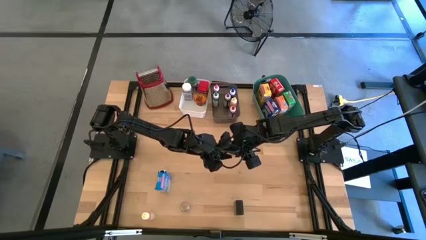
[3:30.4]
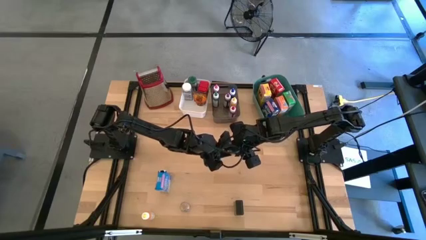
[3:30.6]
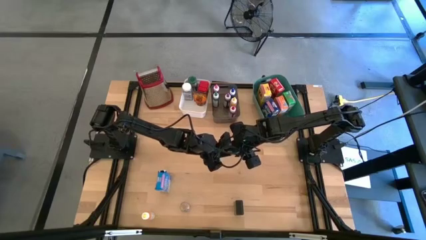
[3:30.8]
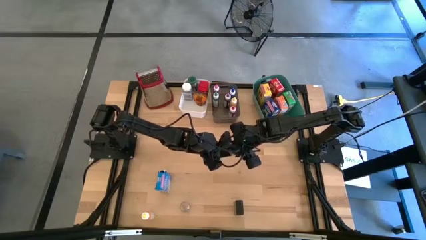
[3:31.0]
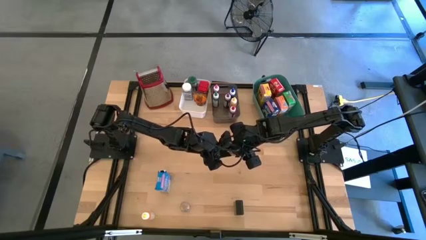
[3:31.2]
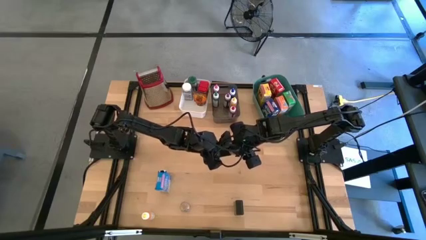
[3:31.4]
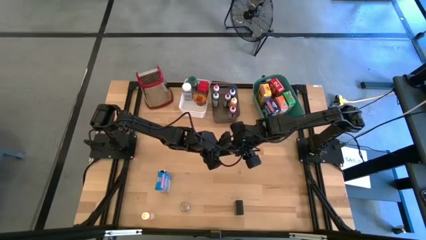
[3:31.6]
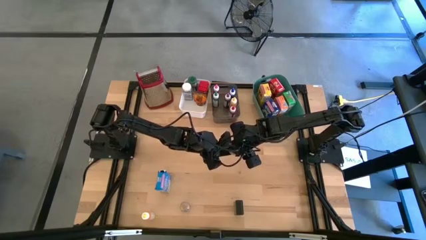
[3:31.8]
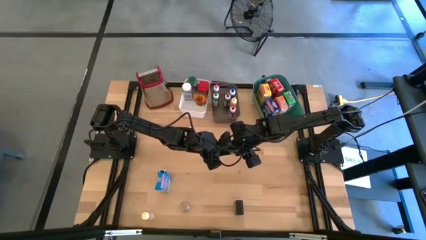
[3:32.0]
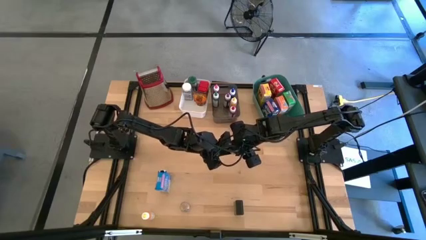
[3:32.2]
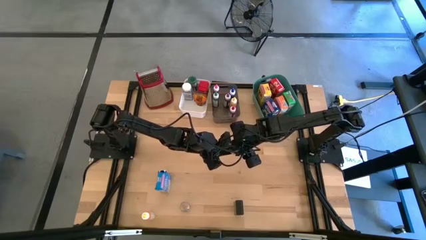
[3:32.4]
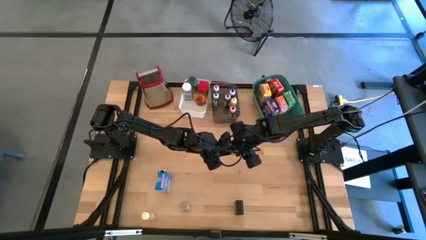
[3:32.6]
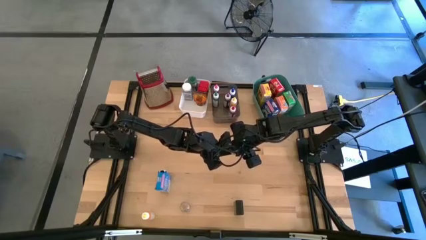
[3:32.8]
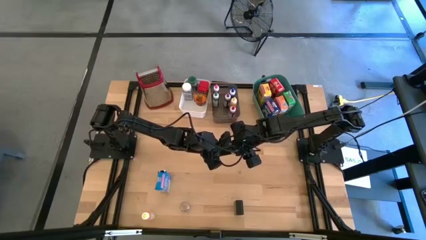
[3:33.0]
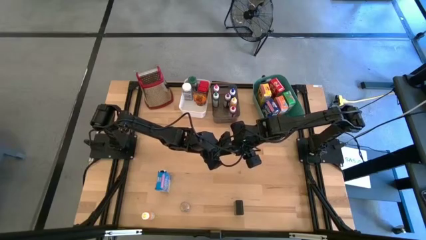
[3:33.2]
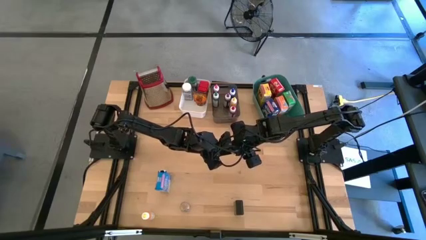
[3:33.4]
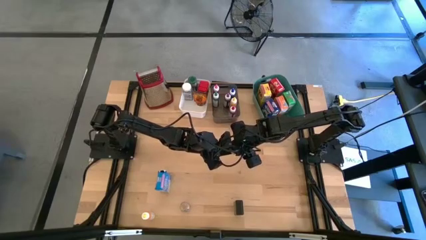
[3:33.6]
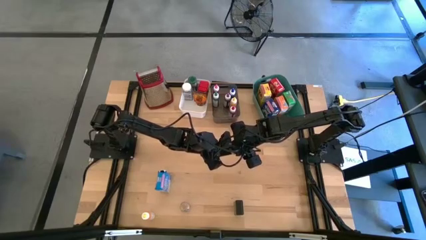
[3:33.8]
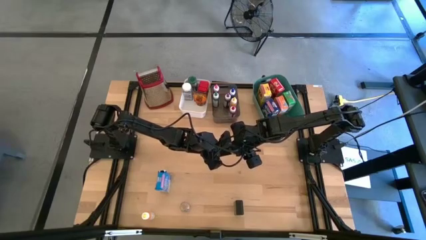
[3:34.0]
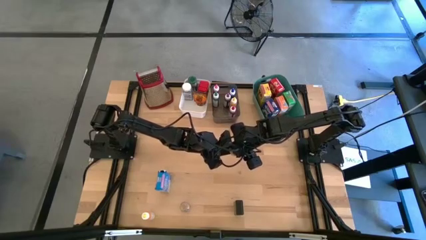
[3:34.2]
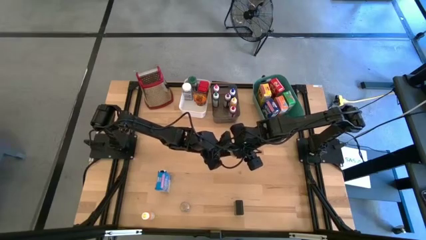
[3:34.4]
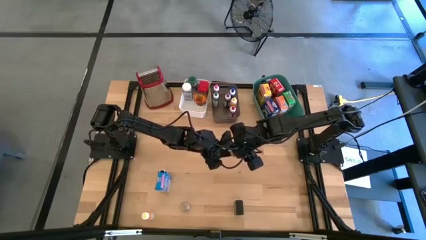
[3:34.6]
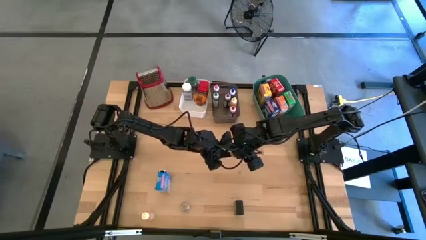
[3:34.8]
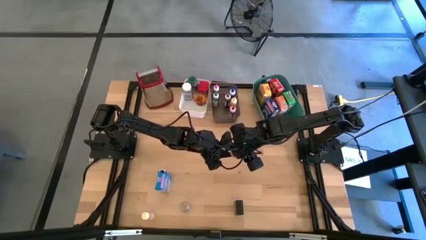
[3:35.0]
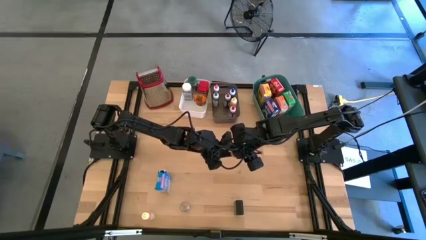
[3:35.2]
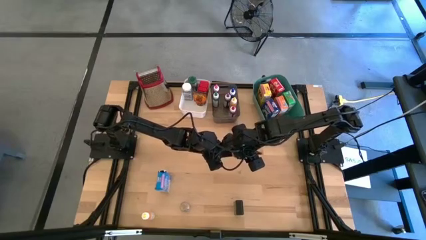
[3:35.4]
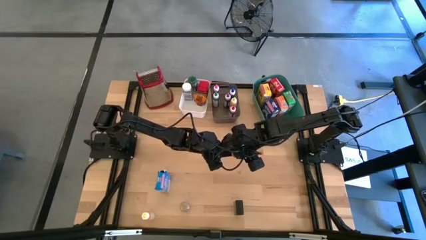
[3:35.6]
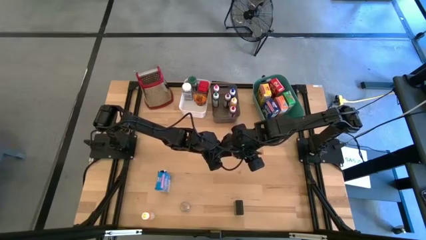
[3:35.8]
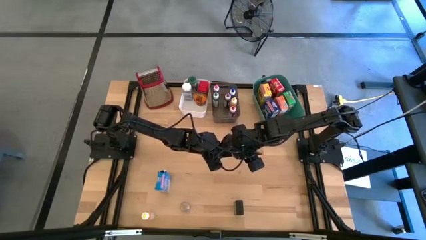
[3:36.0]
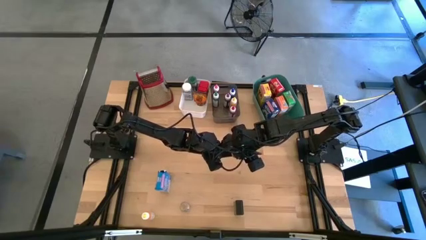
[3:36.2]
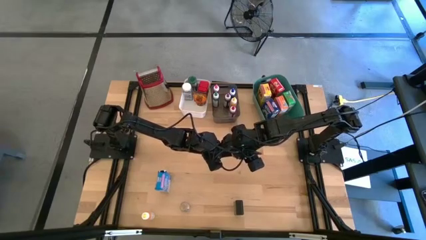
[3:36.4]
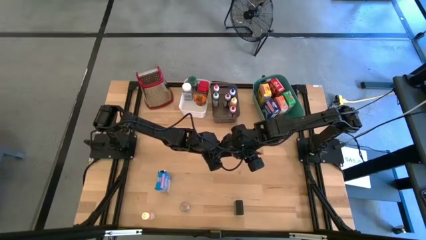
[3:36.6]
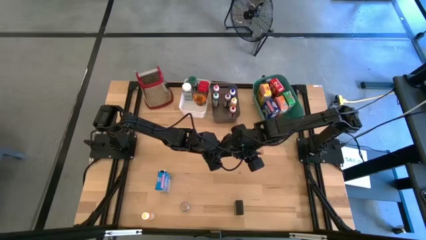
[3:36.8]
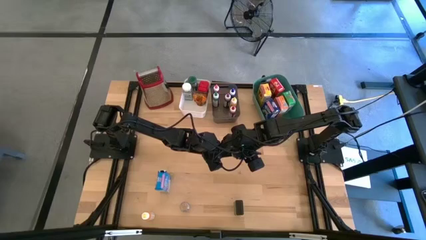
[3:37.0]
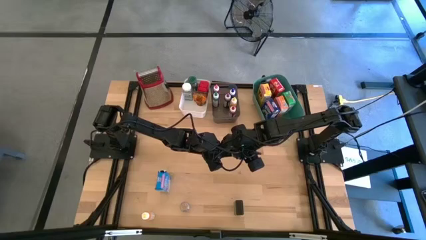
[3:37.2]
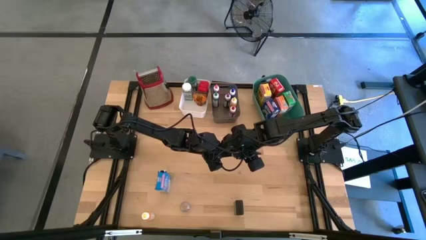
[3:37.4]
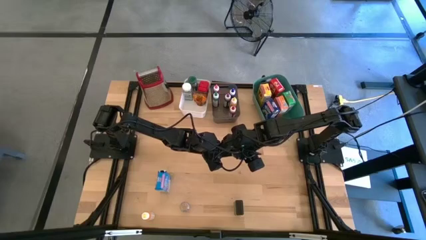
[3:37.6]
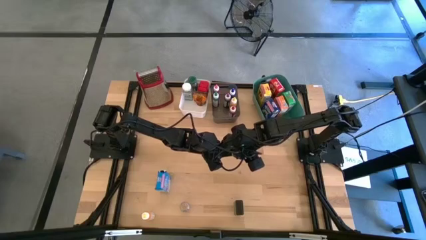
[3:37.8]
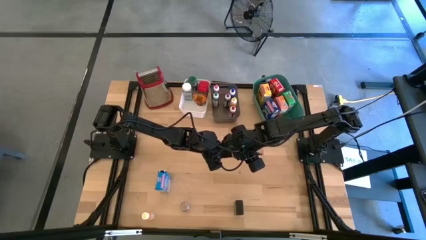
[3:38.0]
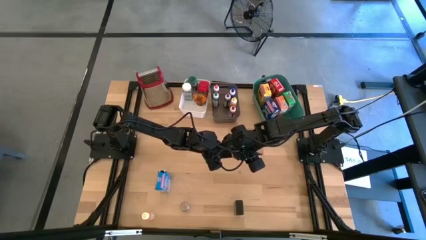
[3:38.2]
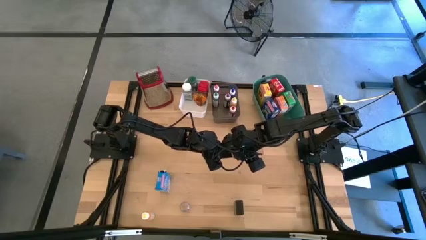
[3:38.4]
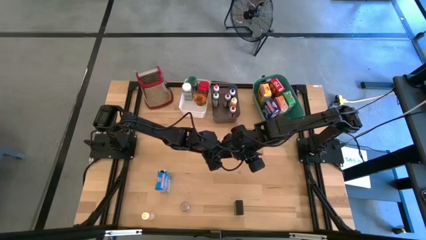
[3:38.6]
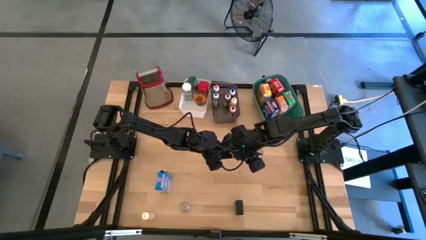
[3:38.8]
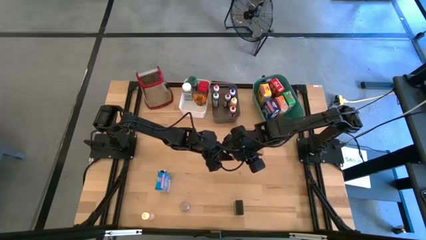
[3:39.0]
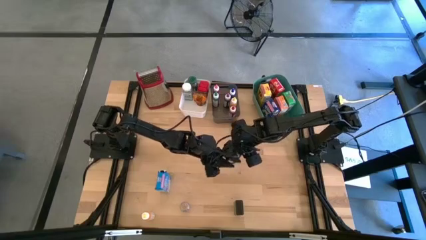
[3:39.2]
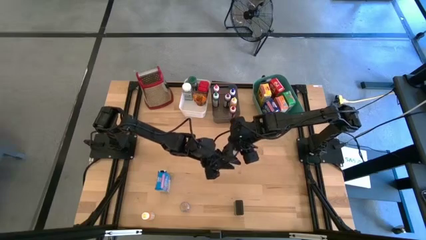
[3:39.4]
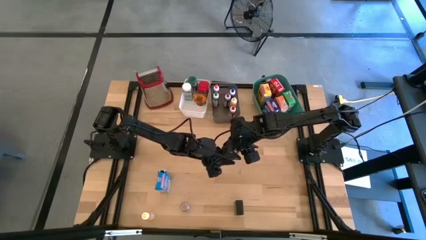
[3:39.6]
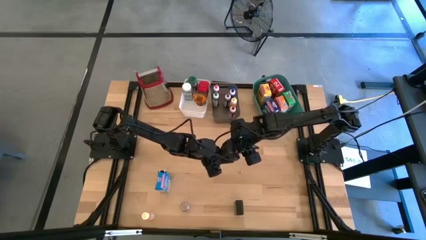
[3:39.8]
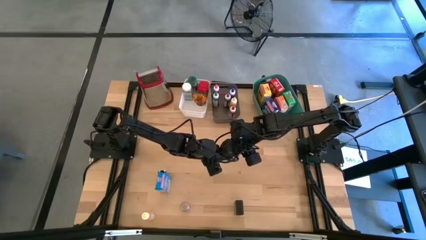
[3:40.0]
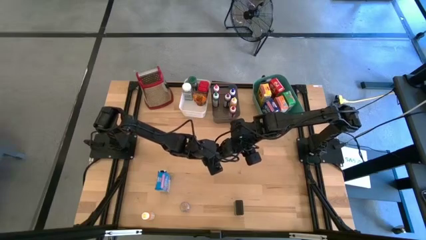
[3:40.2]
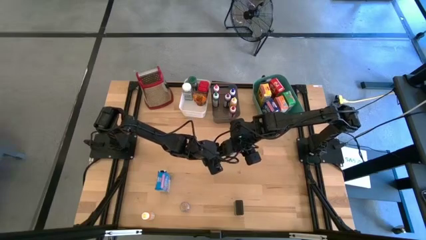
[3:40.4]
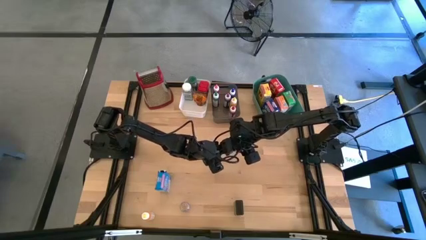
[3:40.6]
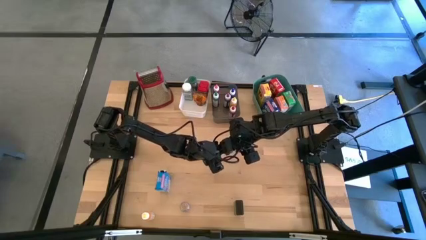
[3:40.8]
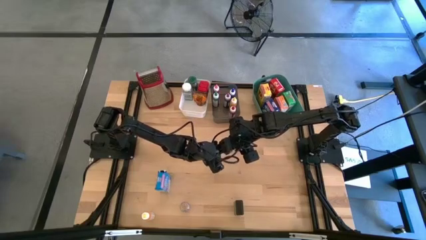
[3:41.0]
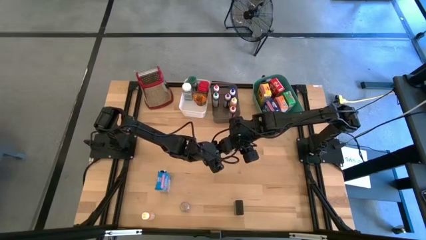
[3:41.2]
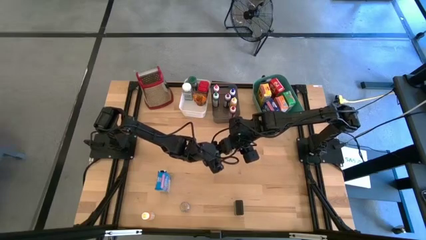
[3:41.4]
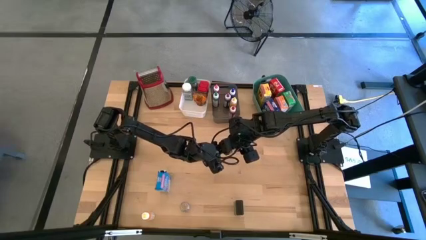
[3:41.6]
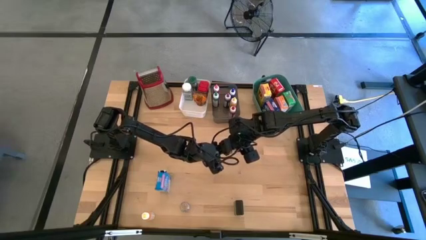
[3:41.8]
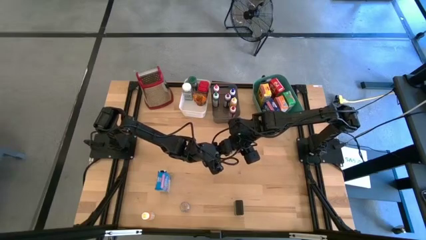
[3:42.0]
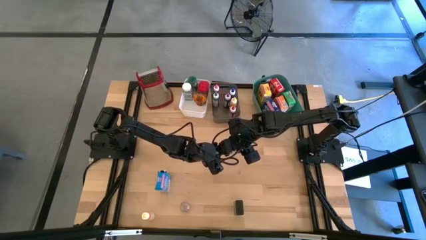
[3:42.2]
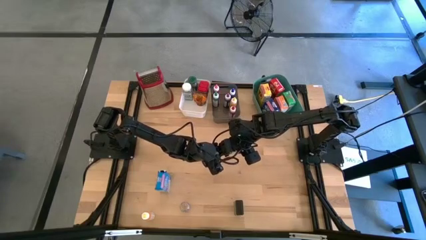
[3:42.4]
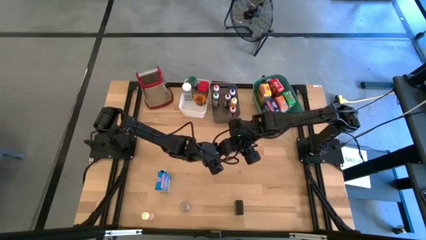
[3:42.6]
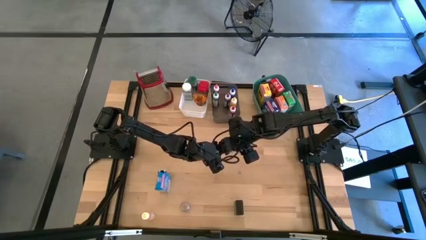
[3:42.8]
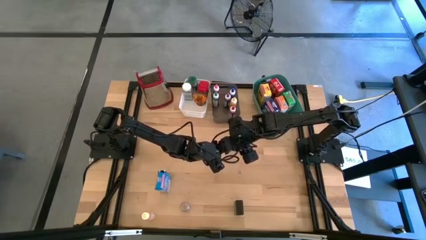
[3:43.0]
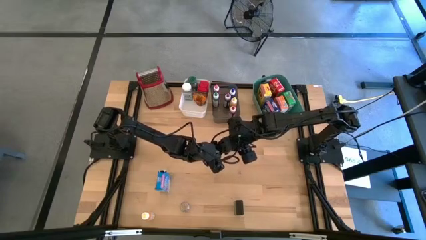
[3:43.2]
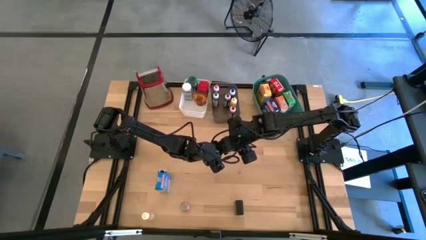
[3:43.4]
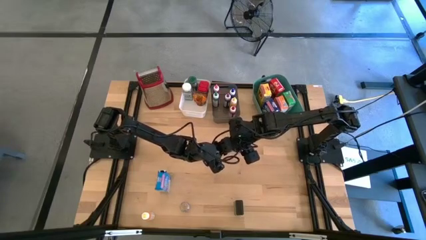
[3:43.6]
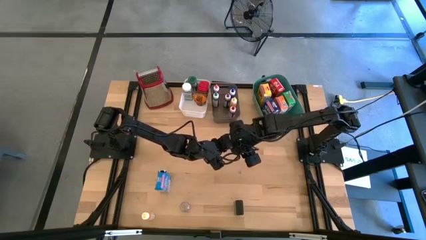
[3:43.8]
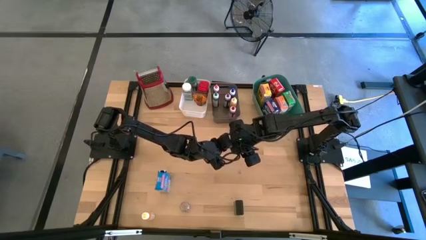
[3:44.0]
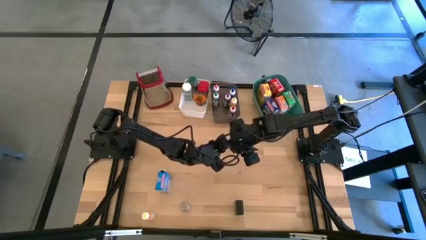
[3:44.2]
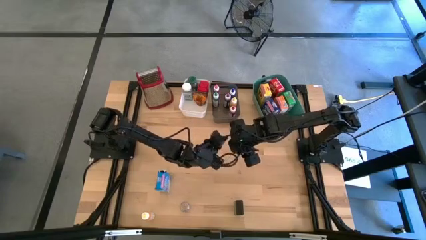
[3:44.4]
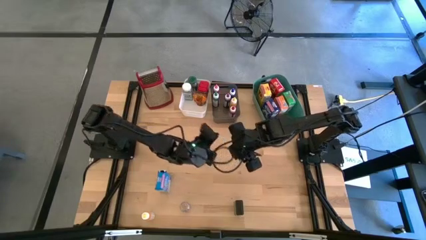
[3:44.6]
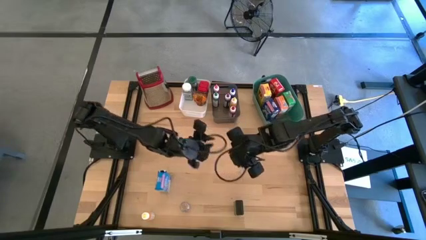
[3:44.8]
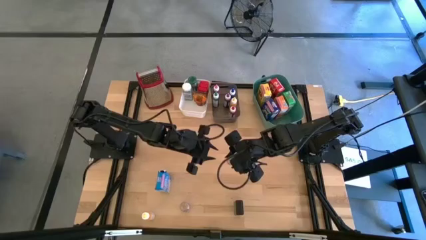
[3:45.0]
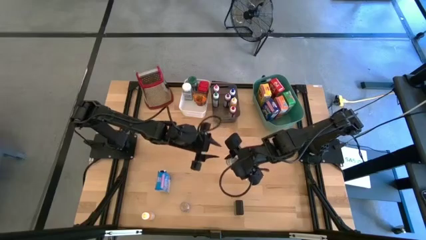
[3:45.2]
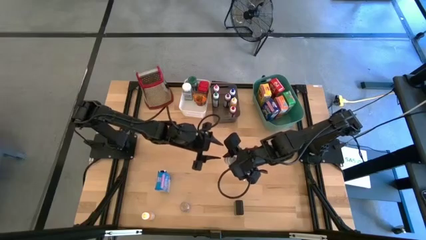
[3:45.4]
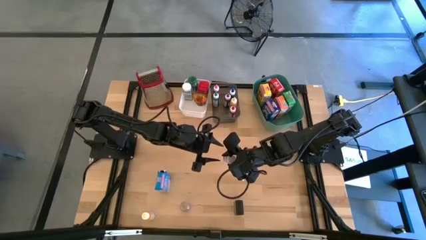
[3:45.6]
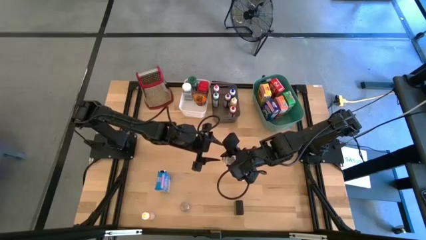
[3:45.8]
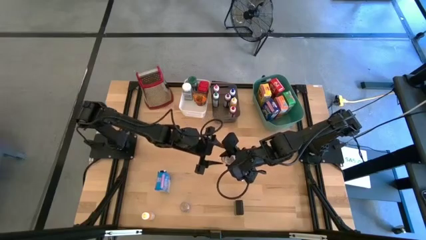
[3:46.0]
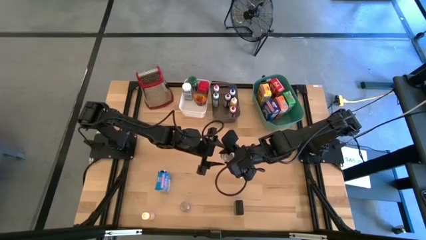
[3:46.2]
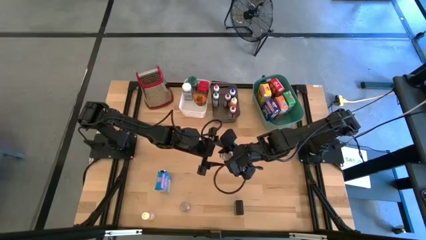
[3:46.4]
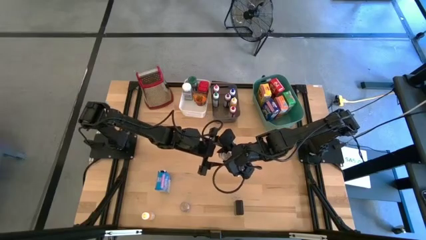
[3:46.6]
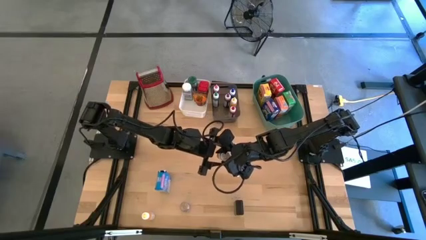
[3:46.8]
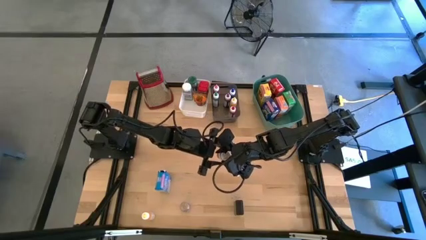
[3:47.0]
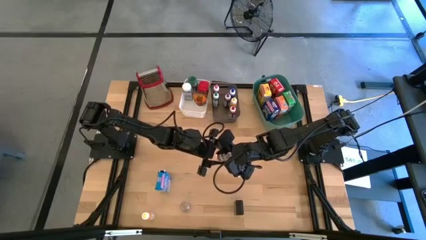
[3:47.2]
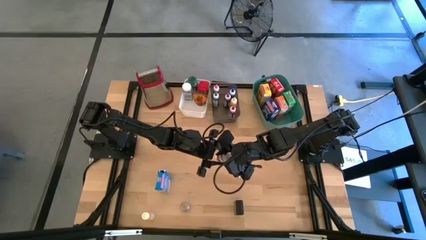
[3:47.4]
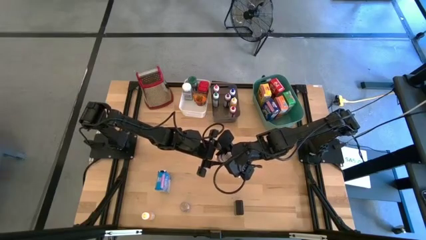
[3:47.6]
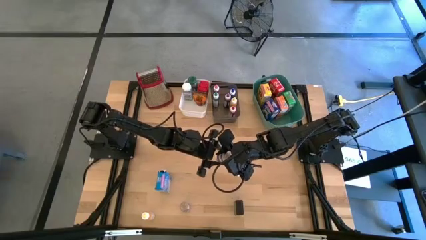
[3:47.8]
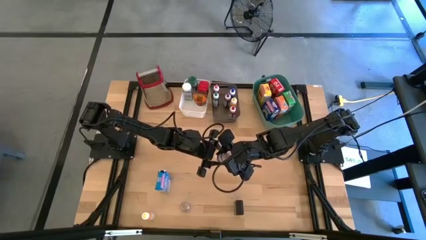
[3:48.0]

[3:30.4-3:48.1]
Task: Pick & Place Kitchen Items
Put the top brown seasoning bottle into the white bin
